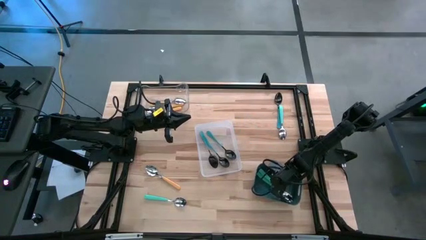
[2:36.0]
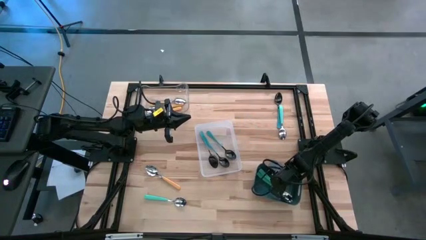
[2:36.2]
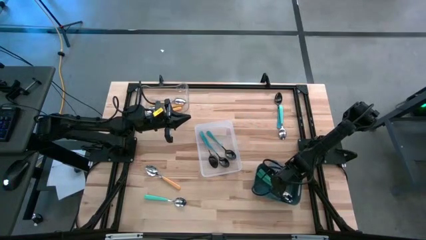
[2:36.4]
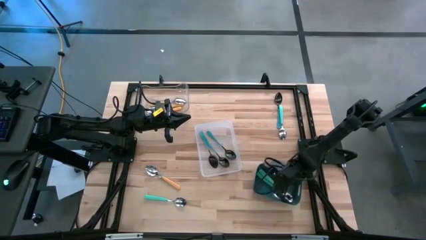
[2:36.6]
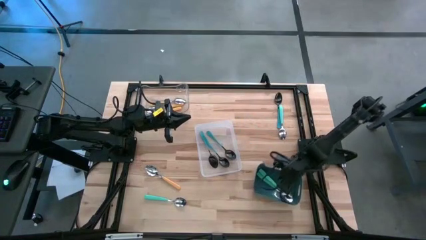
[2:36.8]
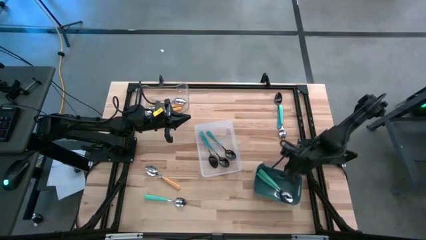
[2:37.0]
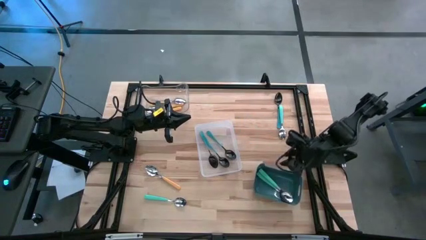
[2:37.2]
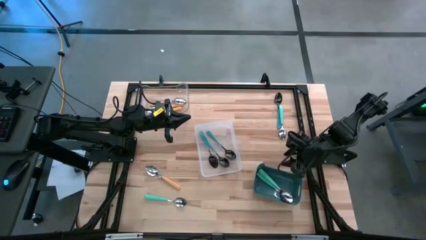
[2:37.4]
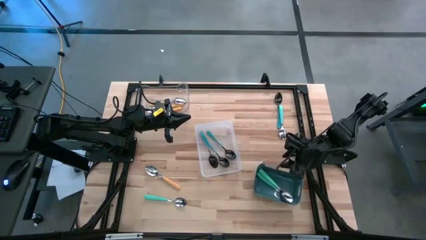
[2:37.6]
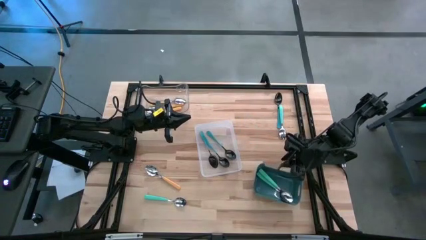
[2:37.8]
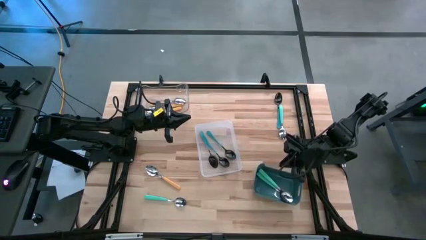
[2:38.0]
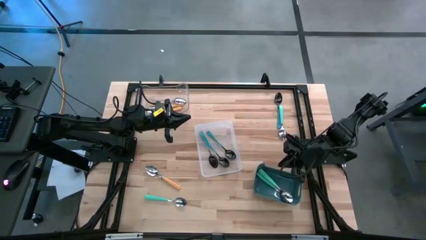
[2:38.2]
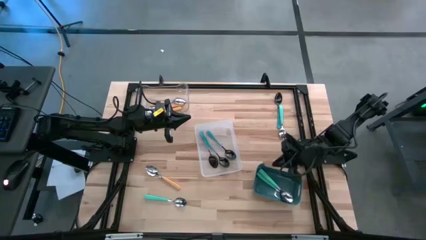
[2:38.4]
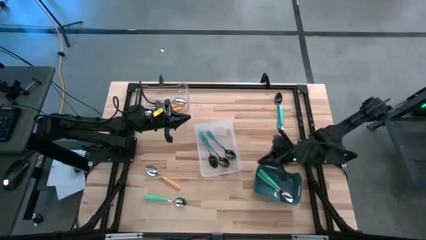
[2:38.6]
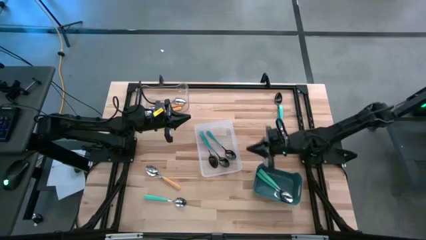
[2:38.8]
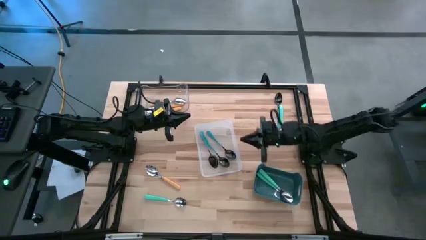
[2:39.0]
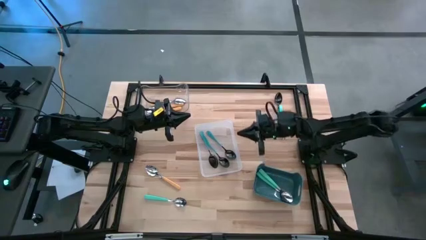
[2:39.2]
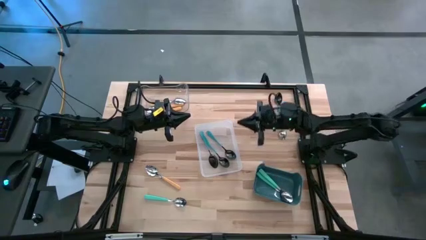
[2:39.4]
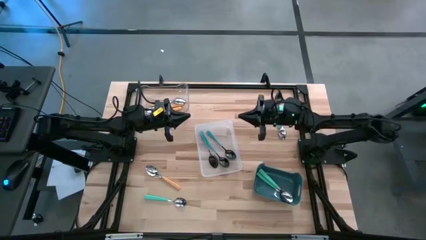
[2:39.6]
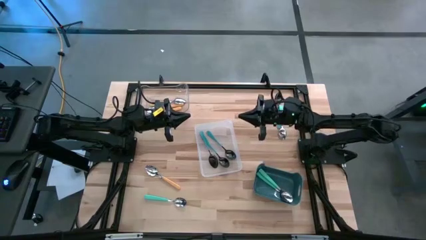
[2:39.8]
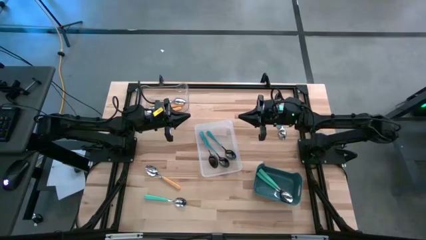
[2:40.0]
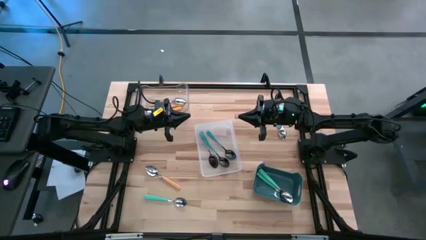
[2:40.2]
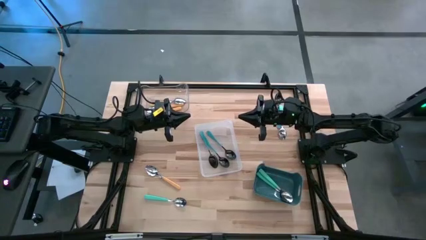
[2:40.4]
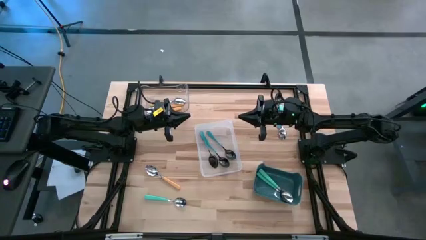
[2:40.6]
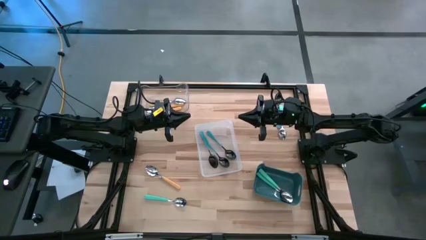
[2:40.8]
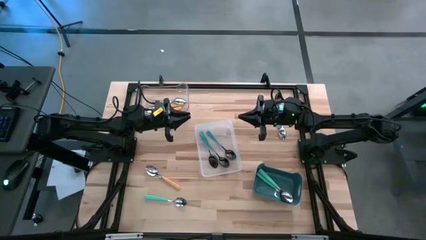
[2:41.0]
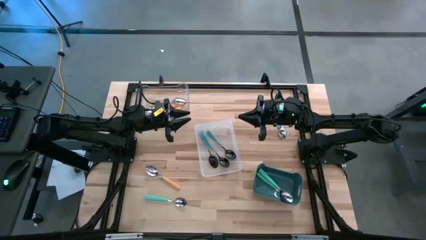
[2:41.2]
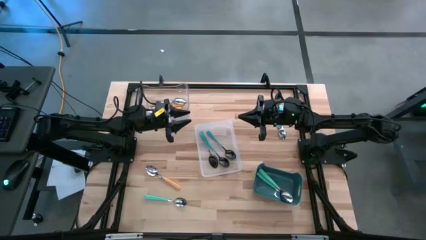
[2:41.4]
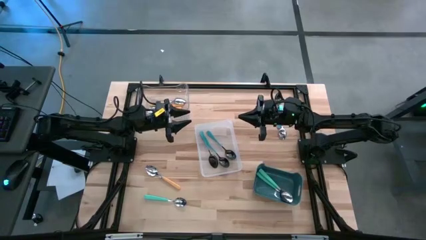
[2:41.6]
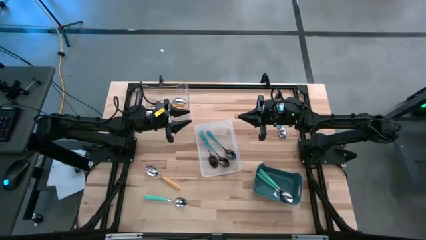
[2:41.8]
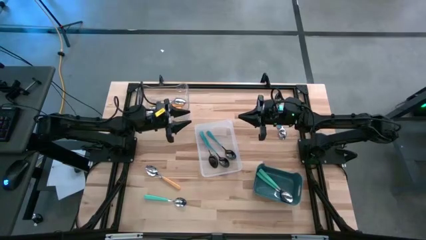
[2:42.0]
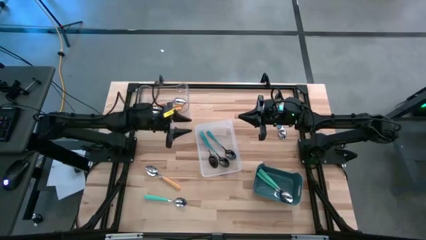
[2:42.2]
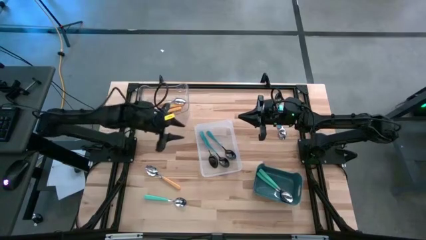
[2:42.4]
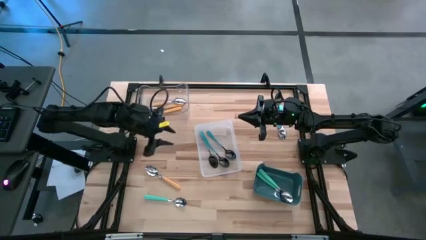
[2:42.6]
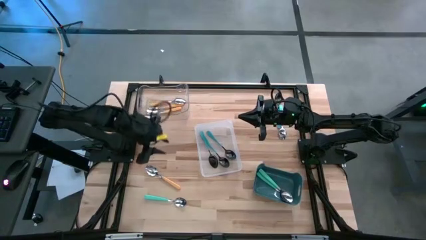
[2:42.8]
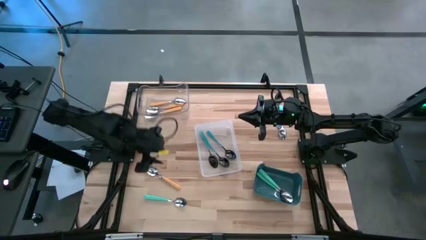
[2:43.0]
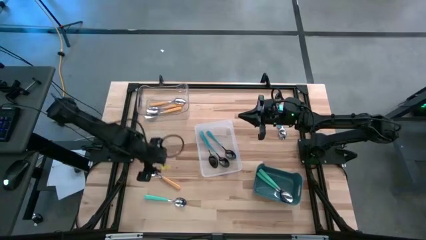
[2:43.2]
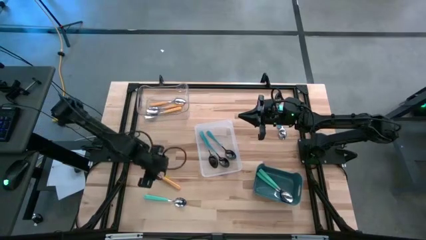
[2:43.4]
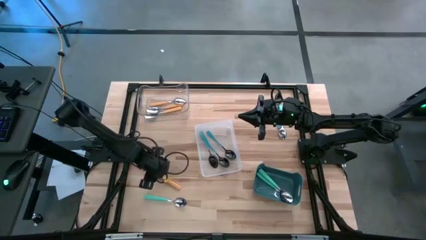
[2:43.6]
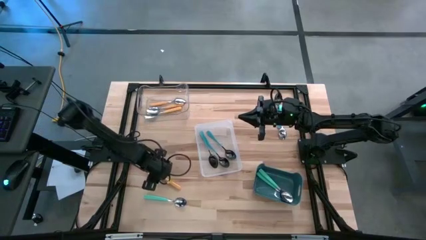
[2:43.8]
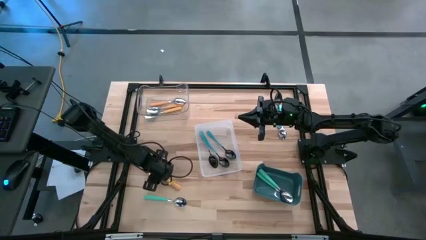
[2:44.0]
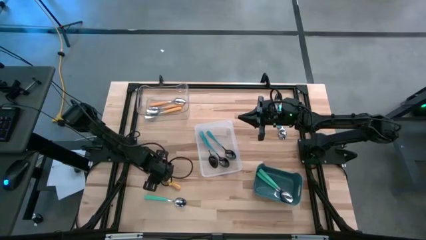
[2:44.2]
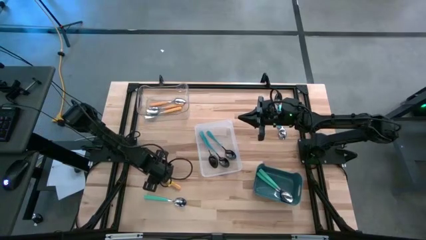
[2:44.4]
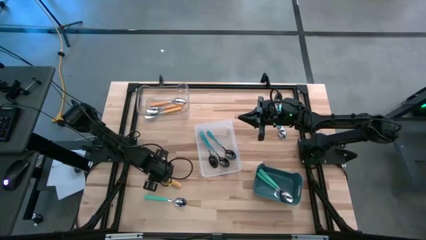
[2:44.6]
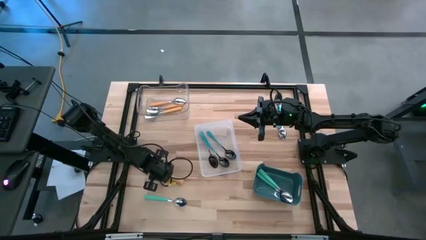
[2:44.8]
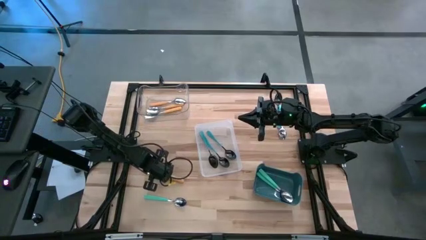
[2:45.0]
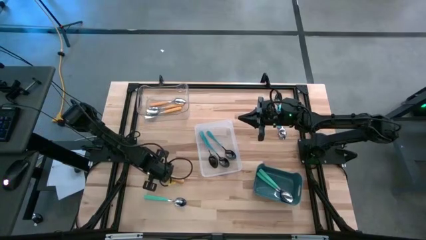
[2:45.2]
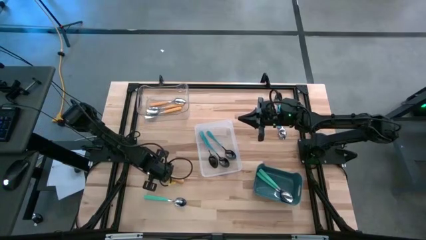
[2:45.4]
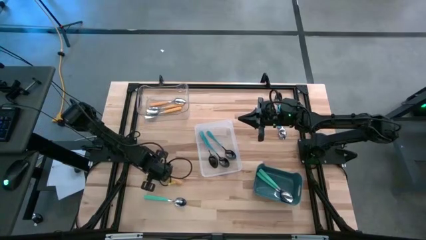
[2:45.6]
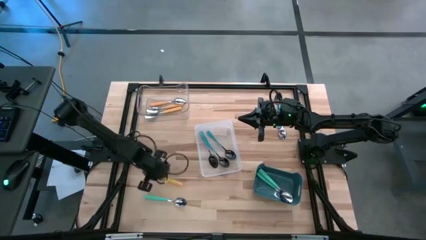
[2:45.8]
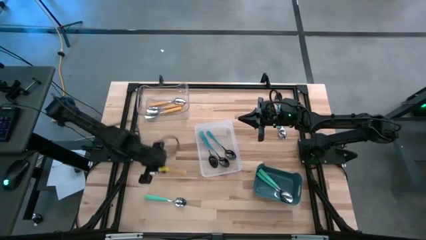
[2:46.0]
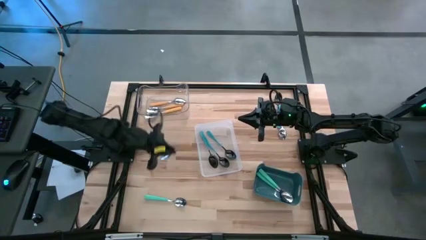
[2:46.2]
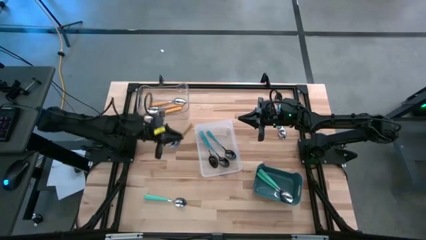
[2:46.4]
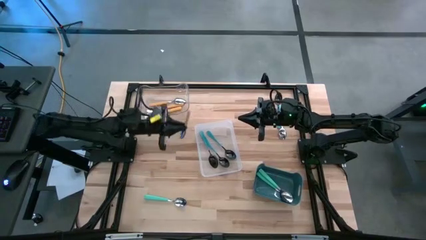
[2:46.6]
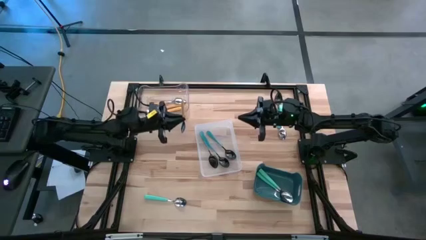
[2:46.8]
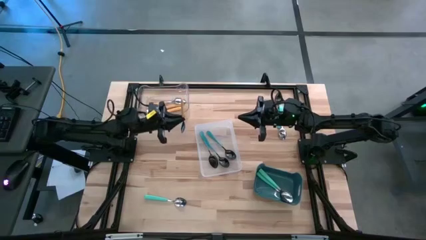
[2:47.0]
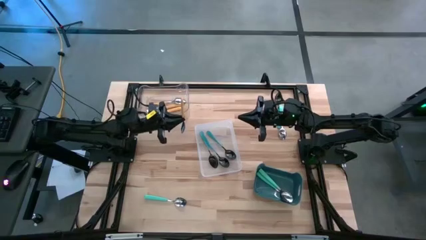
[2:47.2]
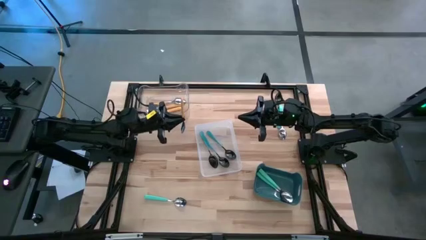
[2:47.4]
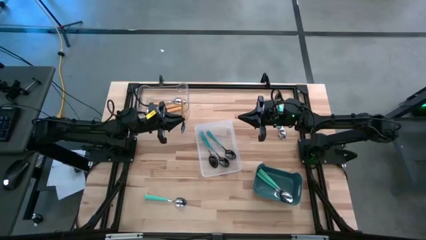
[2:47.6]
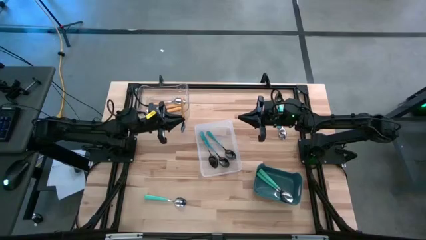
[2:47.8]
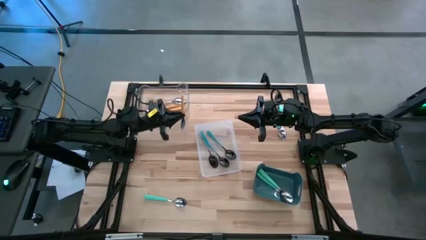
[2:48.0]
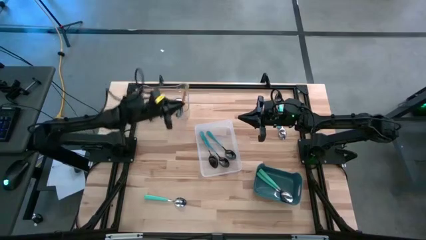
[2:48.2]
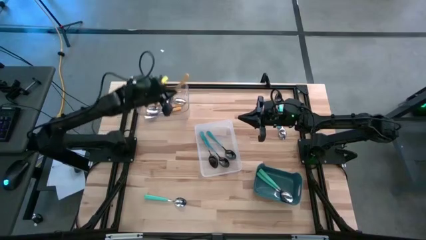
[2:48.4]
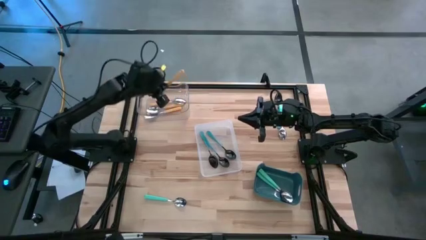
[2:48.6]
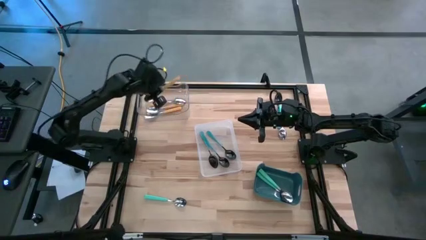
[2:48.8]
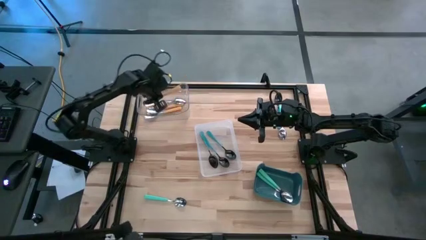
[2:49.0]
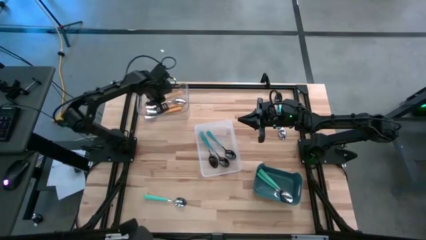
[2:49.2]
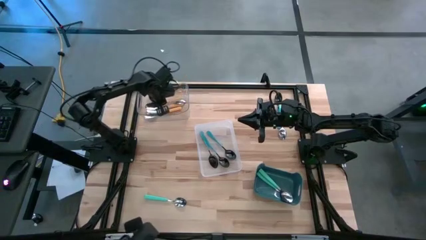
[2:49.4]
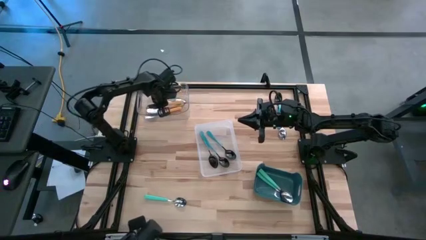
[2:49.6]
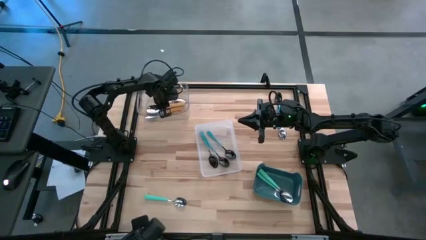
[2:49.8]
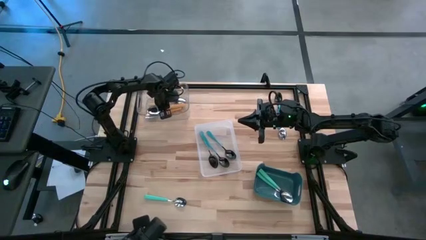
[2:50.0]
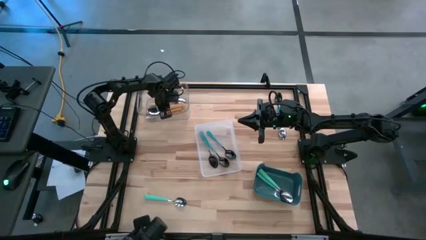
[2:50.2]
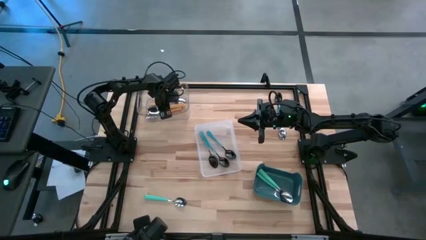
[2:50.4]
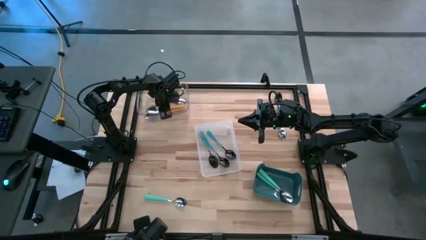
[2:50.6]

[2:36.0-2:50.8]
Task: Sort silverware by color (type)
Put the yellow spoon into the transparent bin
